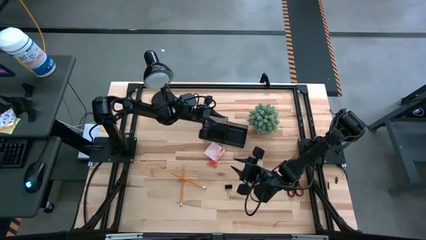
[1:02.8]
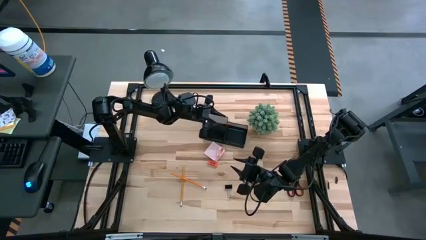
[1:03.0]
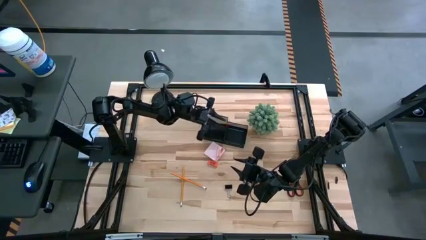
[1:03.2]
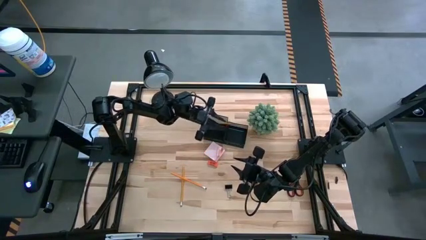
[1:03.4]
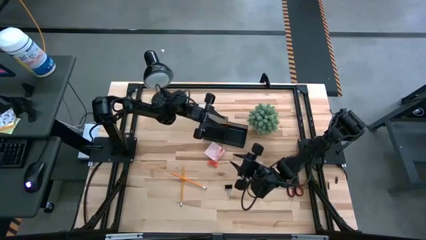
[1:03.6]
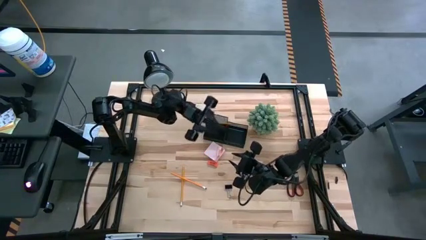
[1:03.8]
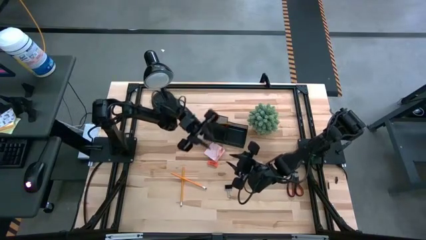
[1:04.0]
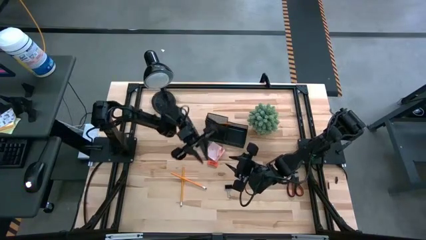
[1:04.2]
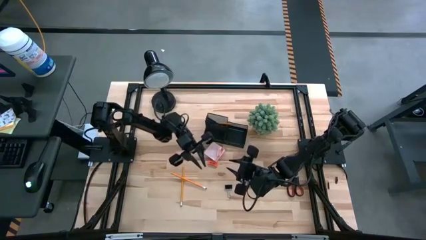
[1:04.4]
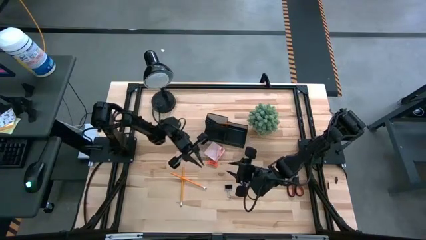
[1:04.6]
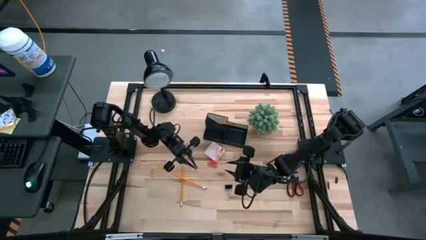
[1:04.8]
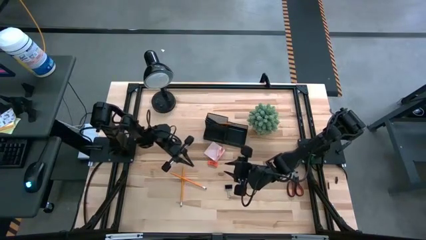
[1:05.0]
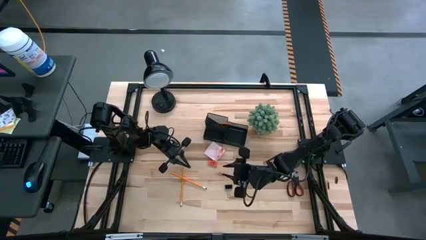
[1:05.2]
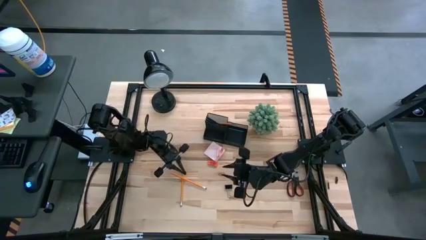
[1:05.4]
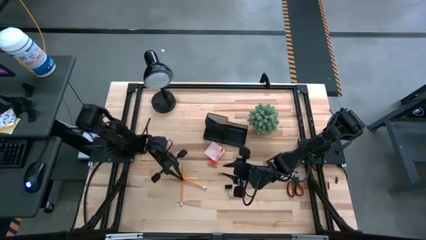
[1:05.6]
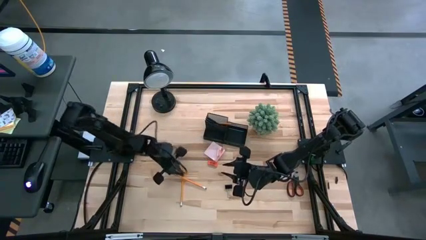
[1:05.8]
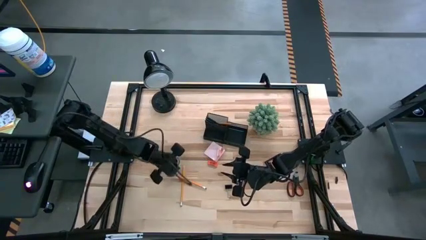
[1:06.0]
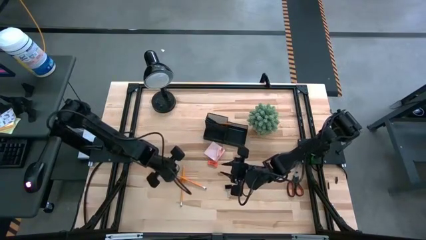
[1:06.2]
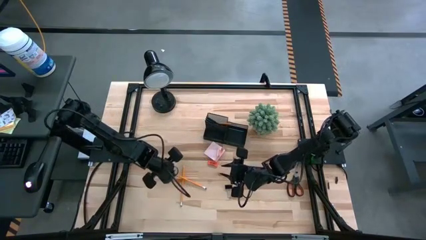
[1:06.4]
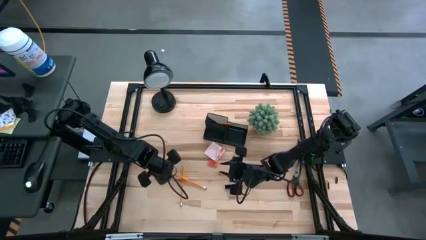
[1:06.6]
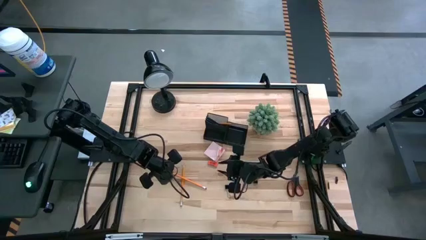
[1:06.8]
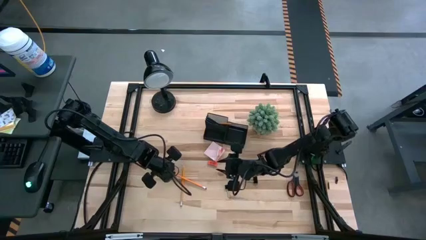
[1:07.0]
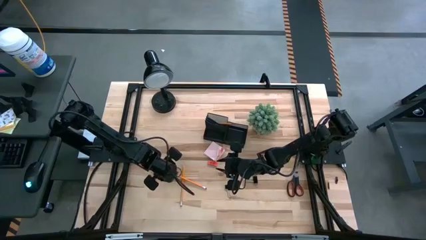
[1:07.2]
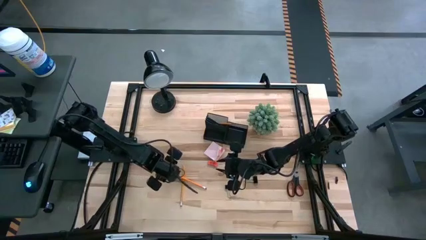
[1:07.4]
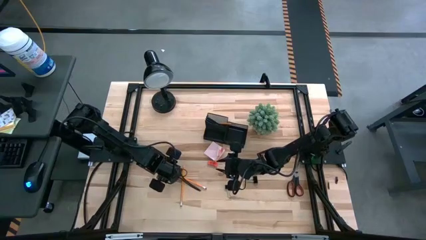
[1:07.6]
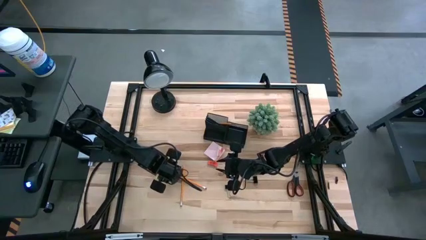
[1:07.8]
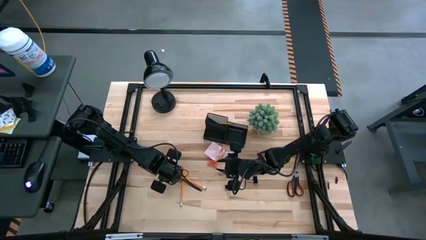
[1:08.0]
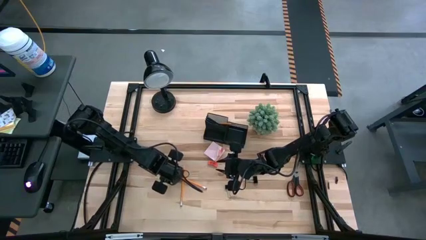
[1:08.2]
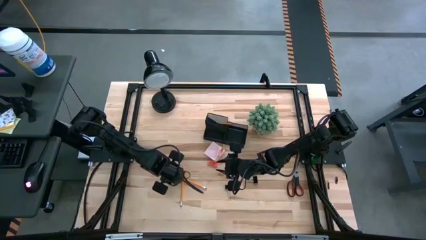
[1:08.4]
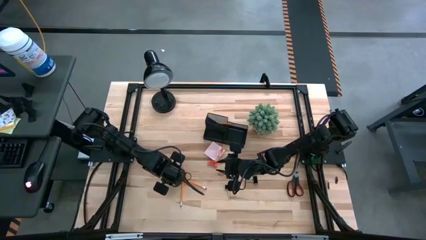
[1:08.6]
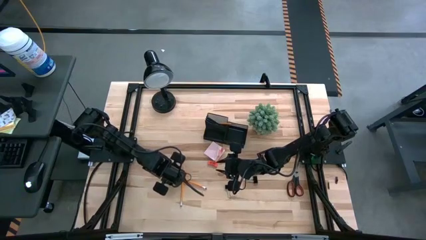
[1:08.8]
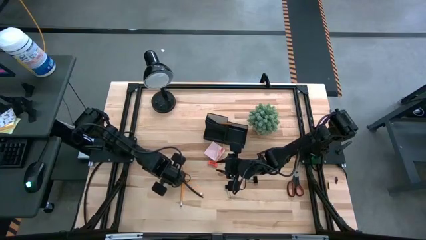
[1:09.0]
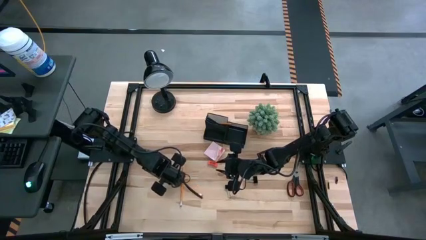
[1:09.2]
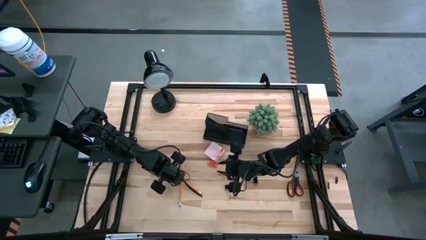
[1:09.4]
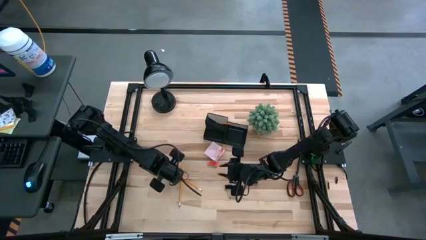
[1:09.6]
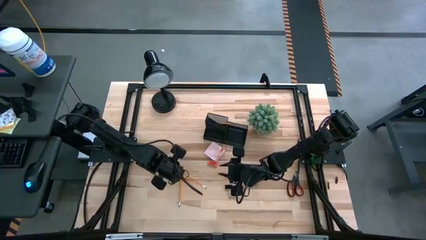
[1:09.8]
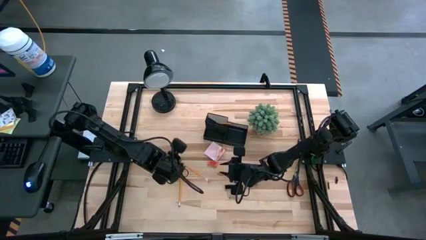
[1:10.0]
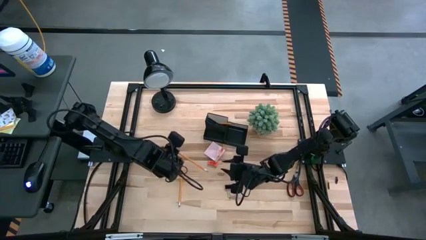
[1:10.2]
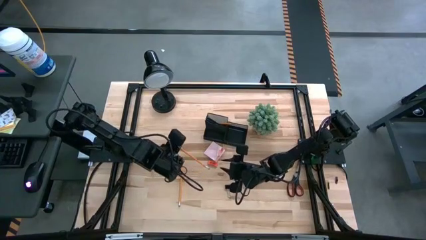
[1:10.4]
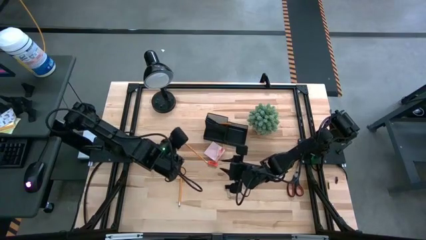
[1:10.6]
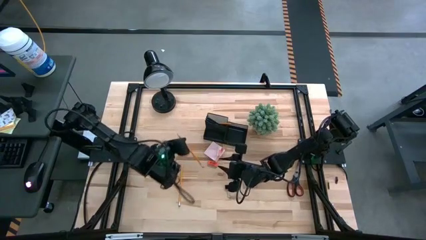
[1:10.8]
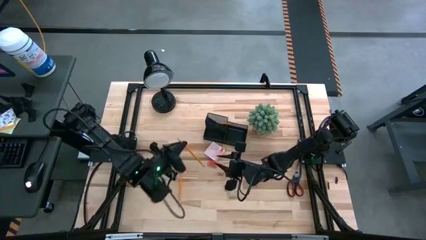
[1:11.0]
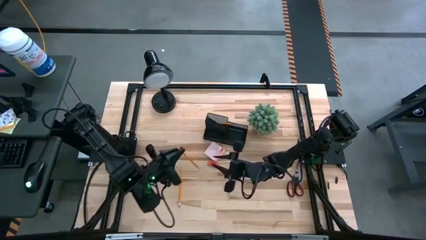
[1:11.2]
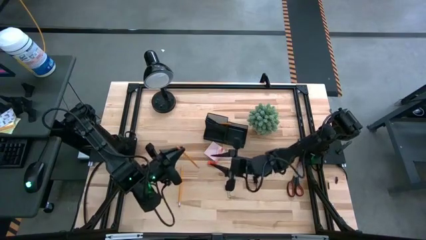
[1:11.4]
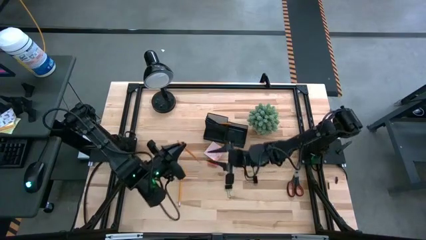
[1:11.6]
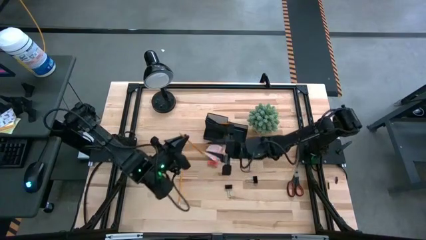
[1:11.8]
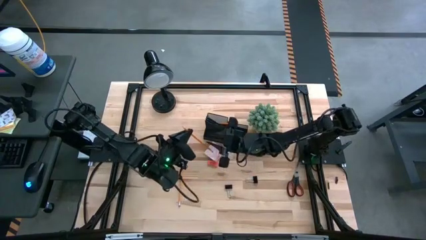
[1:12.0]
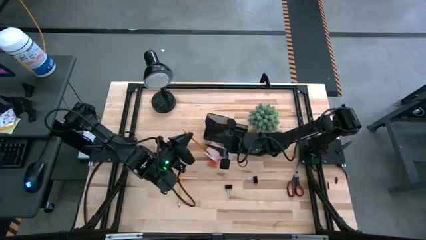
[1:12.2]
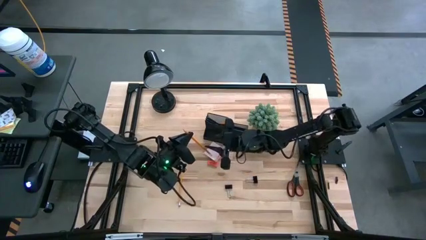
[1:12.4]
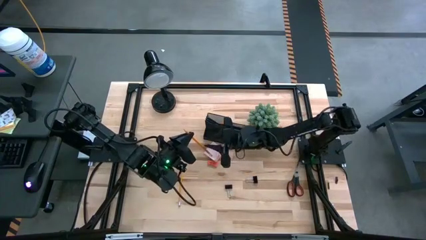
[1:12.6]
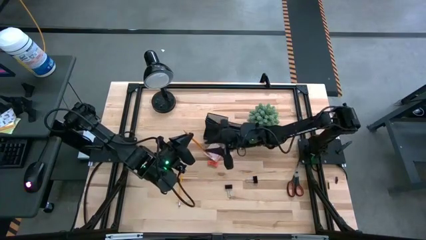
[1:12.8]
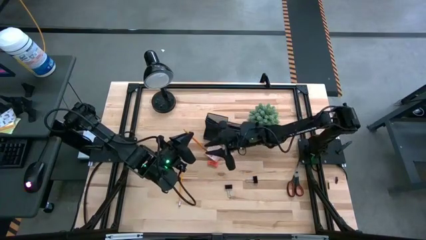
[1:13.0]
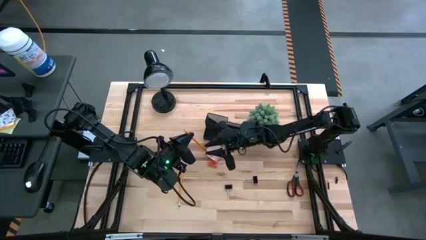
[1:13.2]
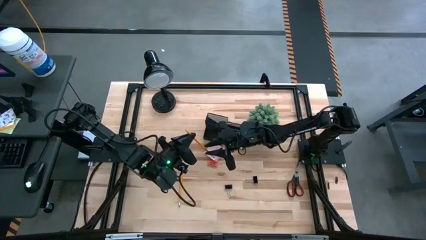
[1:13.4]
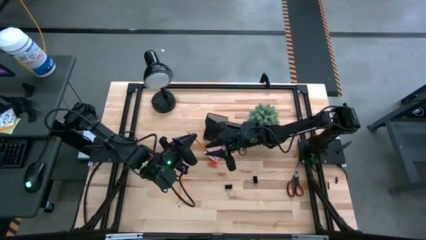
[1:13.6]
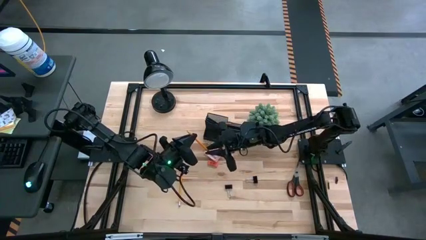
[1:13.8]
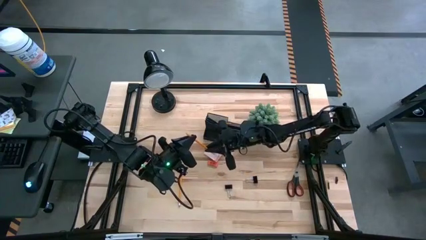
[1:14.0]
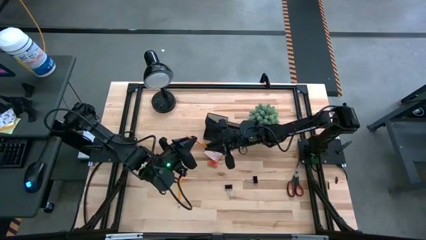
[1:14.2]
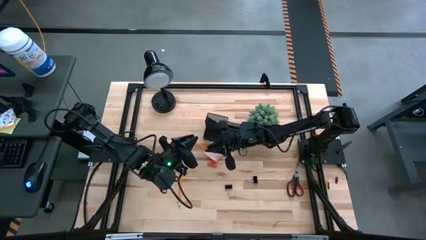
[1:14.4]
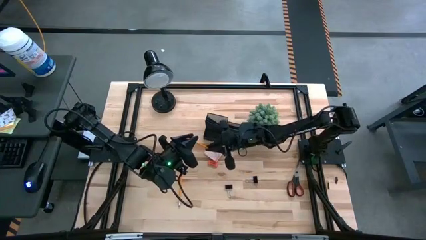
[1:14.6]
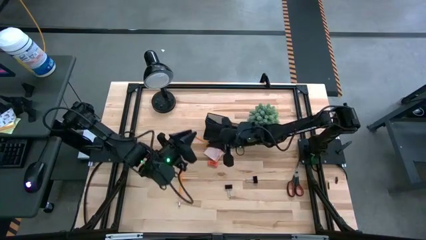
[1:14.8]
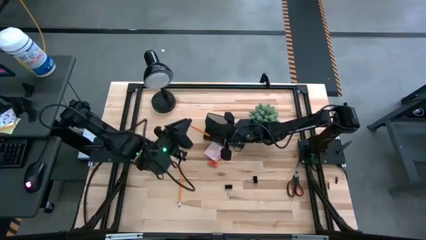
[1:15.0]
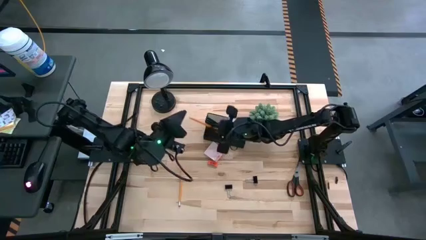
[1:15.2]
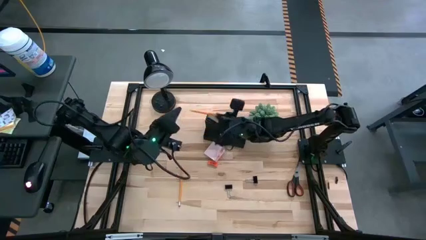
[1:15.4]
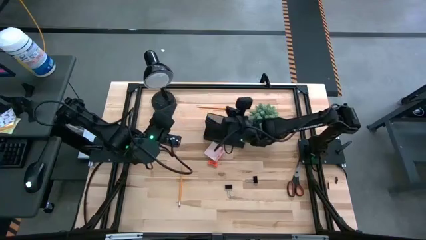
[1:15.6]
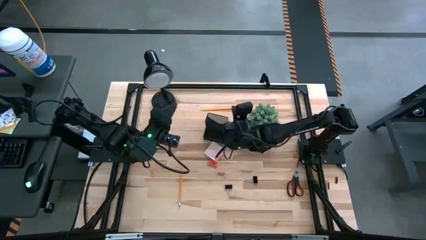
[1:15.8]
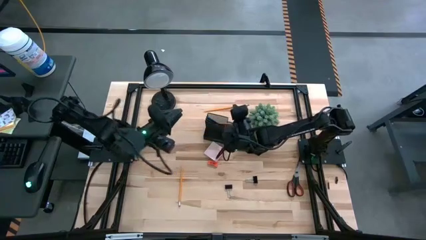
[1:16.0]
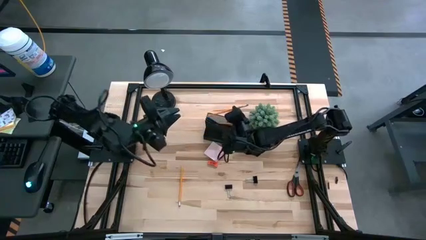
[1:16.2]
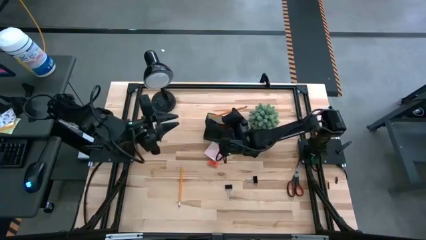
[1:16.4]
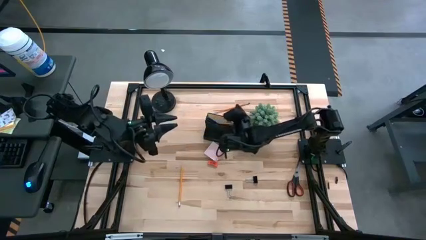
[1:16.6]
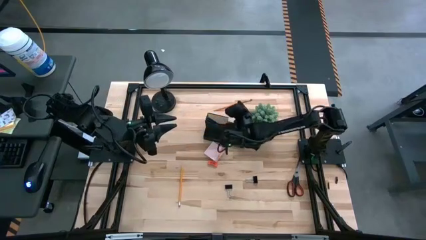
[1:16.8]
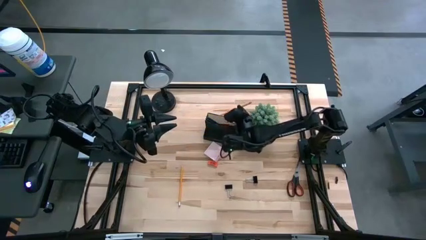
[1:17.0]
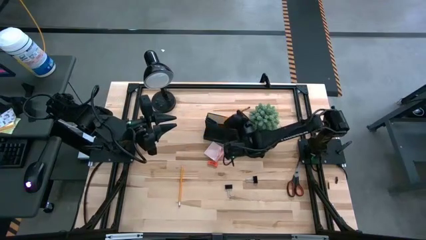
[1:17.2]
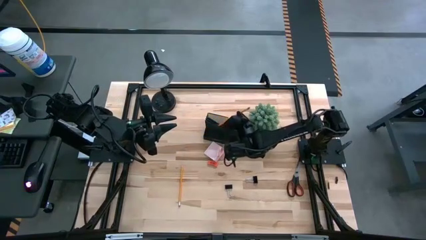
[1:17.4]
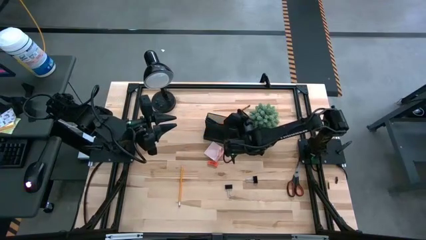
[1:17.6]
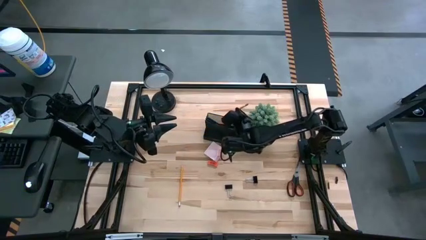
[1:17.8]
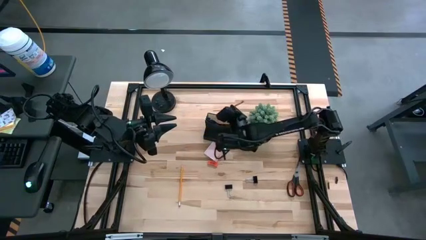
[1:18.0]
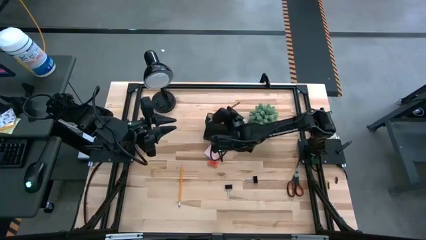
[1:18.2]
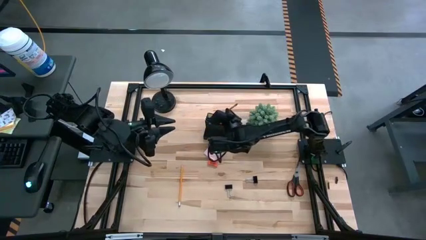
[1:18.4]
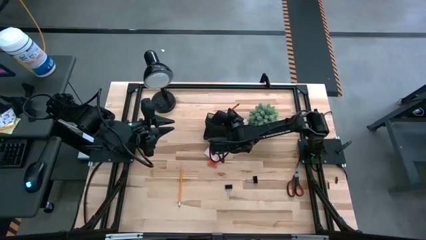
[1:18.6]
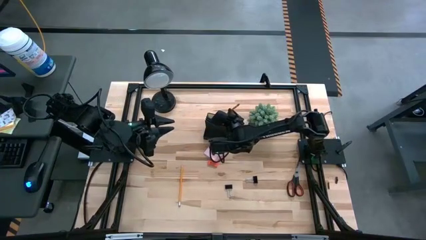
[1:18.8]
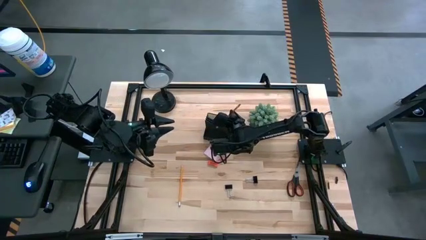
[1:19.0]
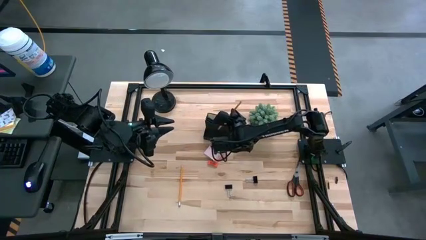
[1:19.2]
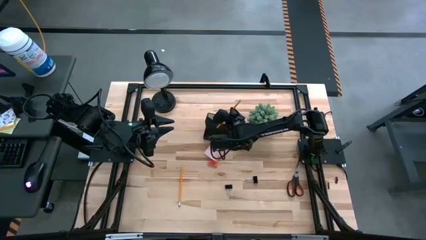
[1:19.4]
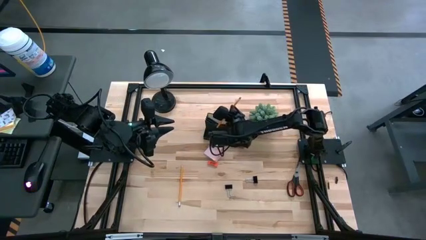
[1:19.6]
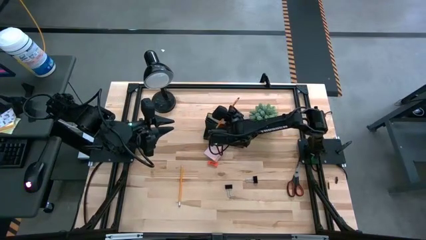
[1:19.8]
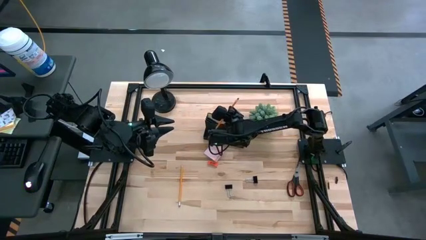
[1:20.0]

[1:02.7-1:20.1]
Task: Pick and place office supplies into organizer
Put the right orange pencil into the black desk organizer
